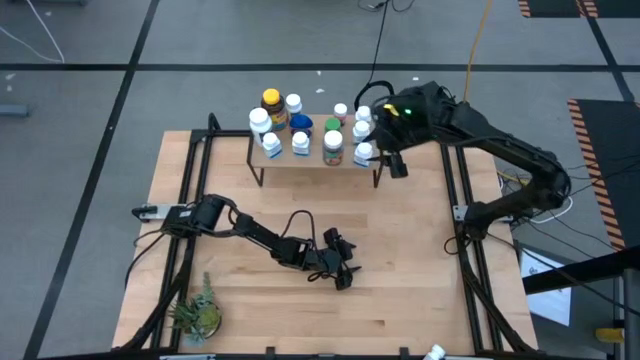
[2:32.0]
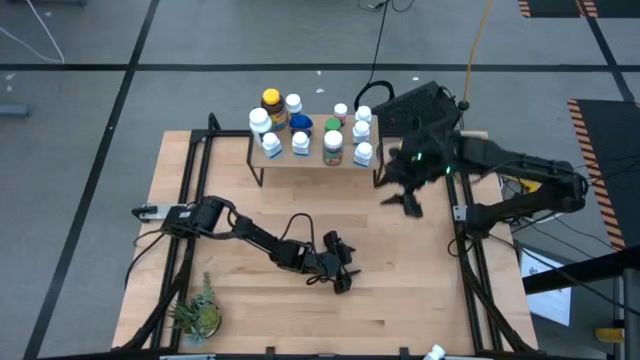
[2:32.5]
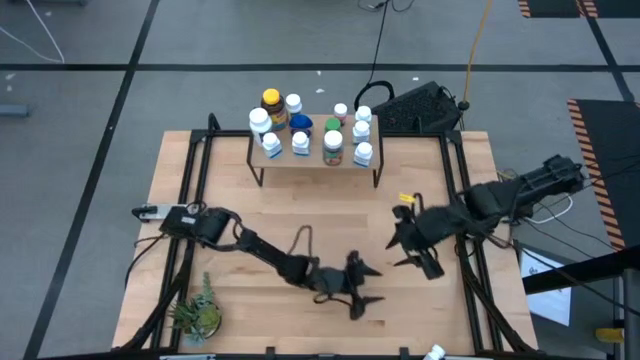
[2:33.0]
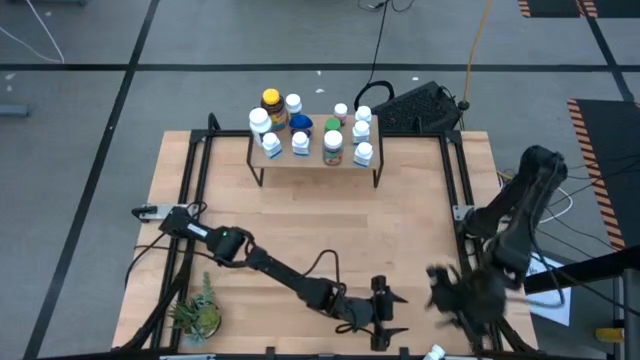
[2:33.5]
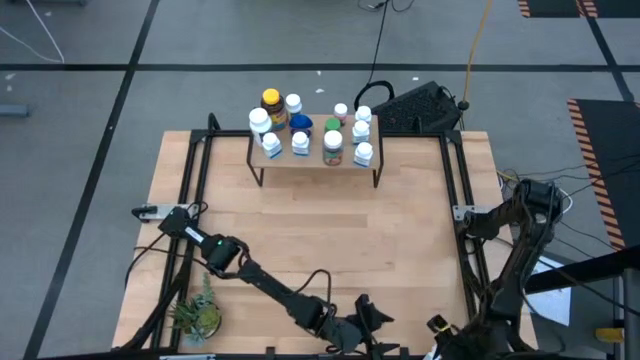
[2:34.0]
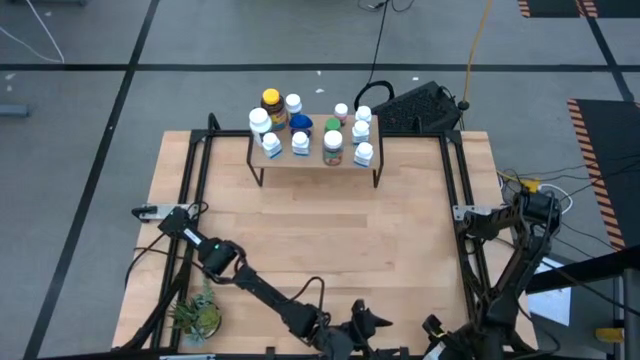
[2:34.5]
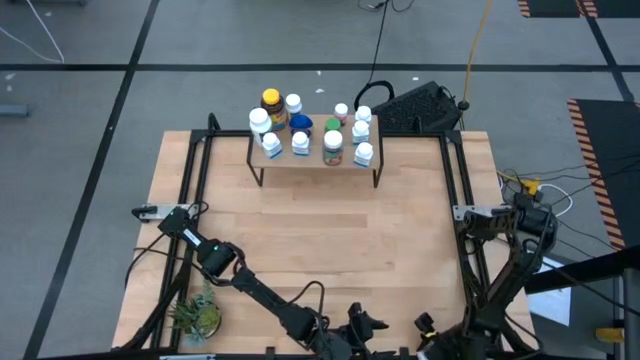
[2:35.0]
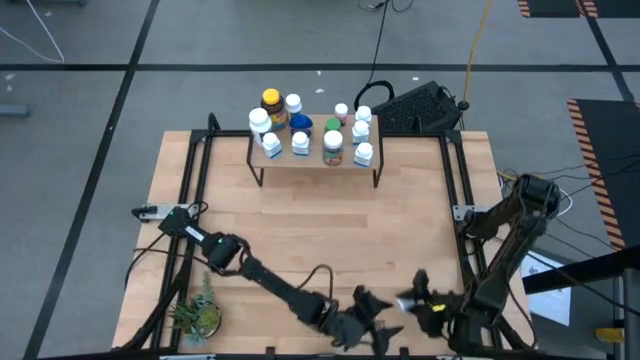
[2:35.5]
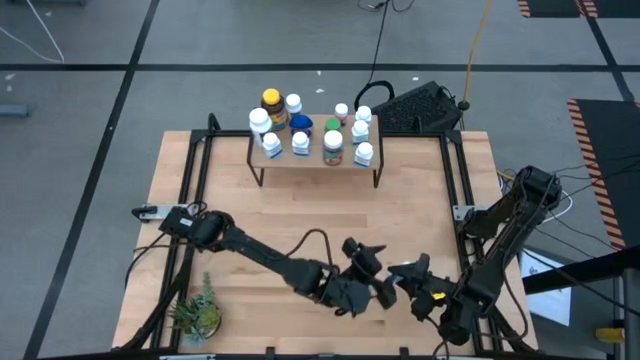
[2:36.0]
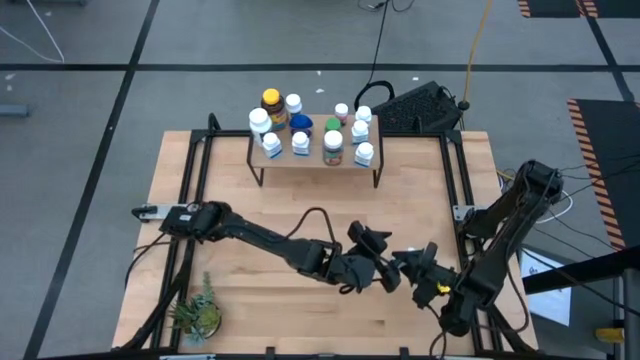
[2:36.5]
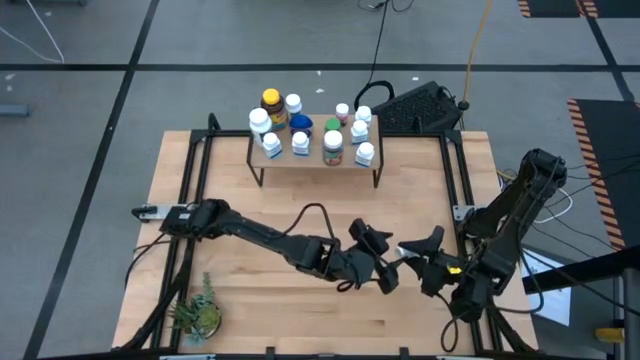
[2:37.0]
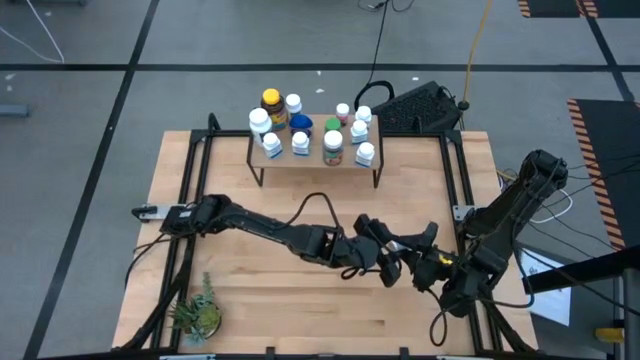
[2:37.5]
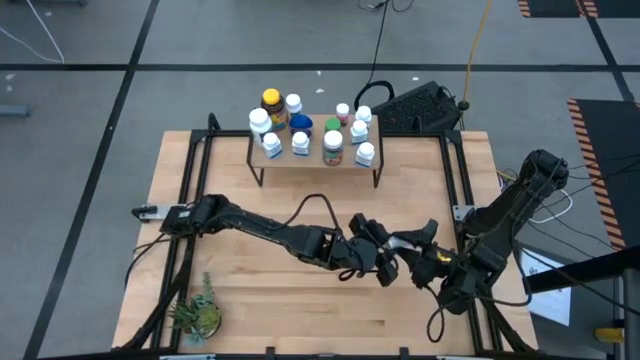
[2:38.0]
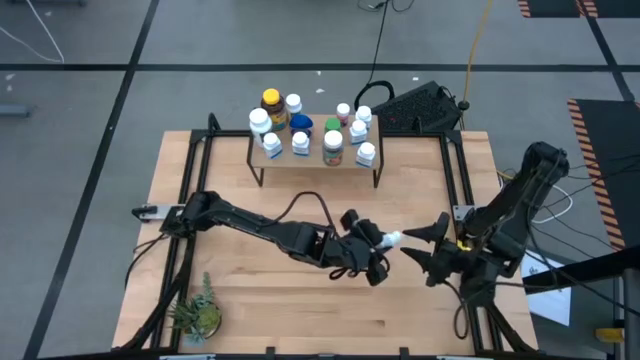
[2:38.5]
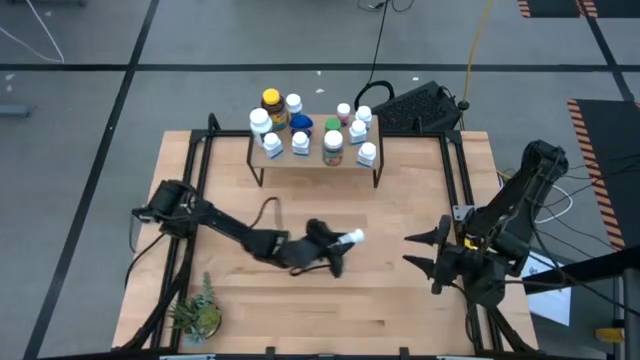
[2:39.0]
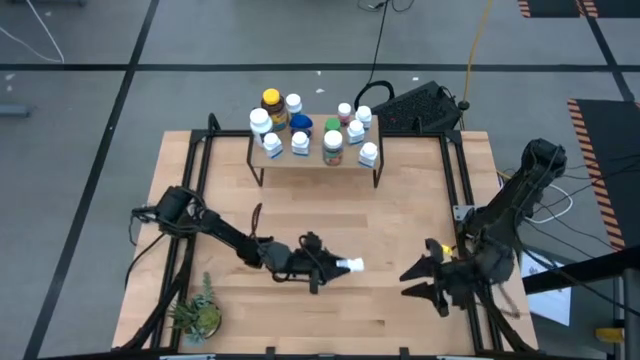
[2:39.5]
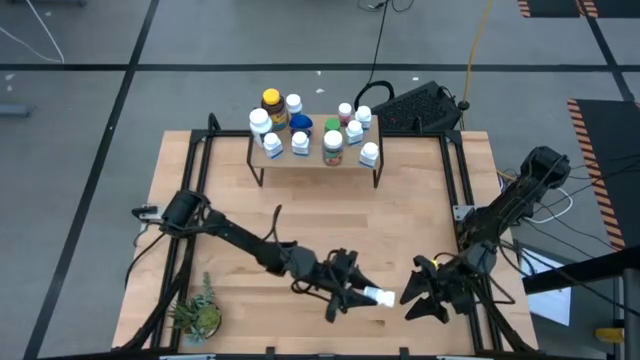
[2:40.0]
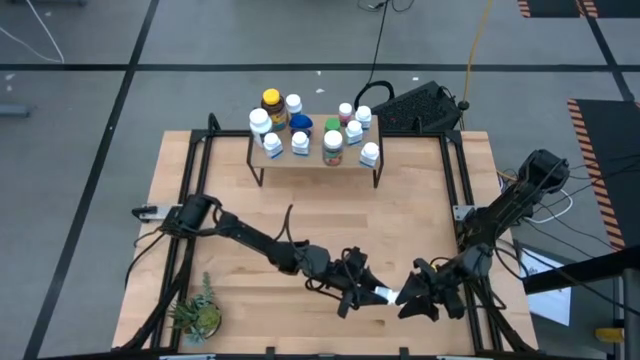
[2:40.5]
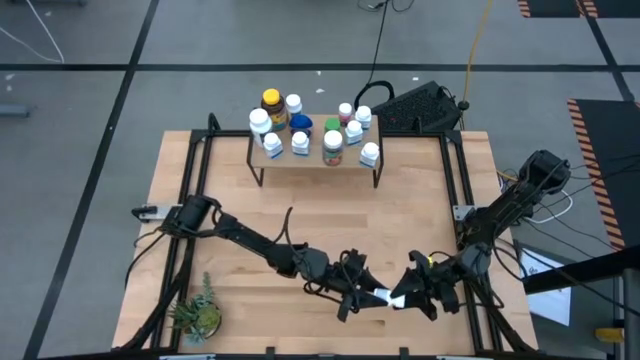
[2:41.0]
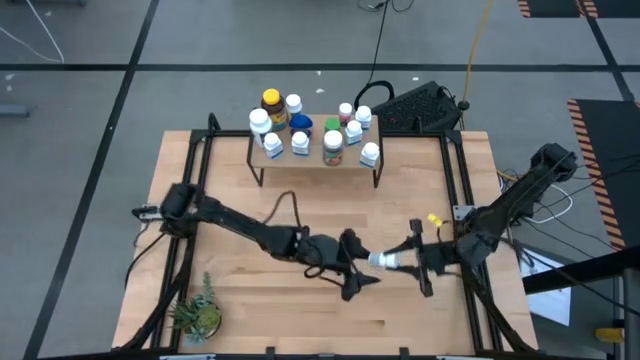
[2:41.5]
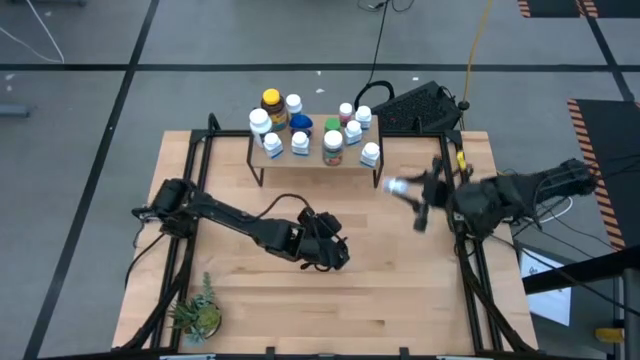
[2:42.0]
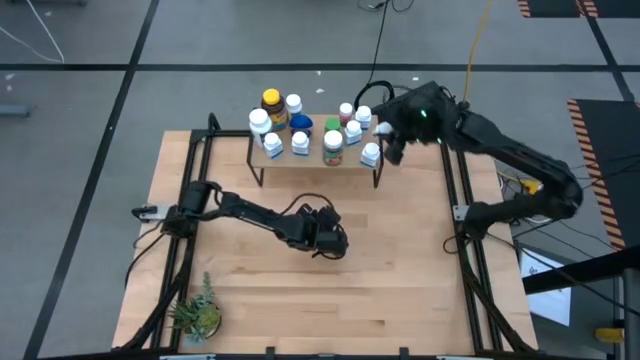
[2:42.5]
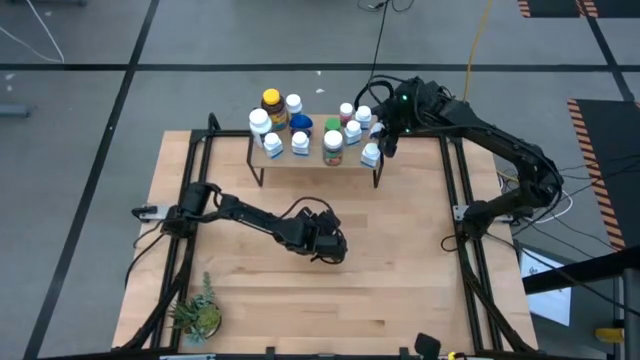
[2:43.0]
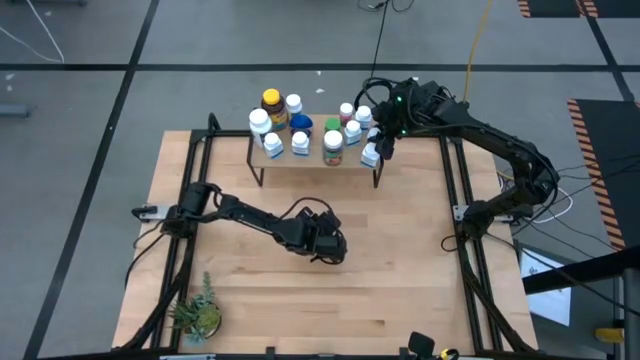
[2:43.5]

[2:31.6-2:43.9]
Task: Pick and place medicine bottles onto shelf by color
Put the white black medicine bottle on the shelf

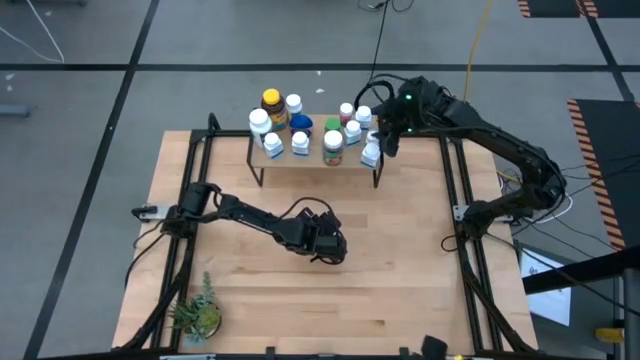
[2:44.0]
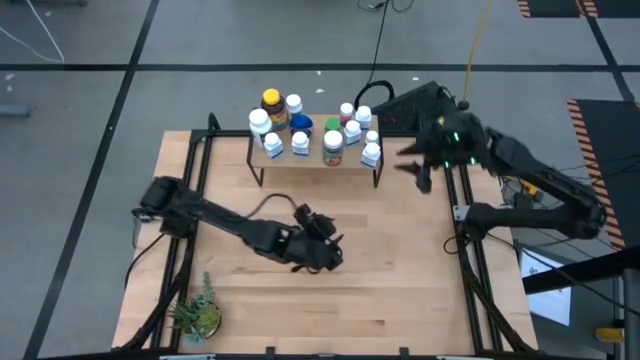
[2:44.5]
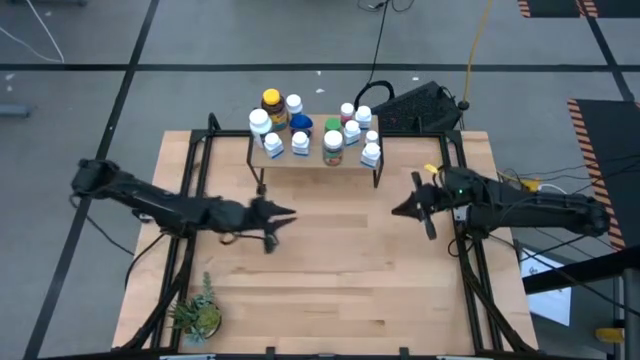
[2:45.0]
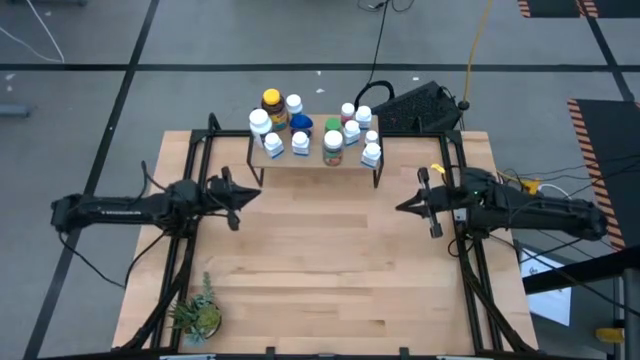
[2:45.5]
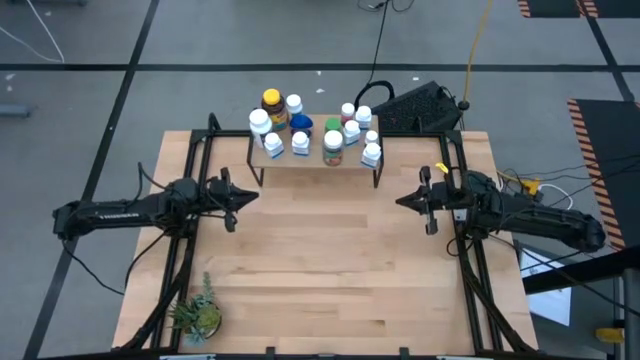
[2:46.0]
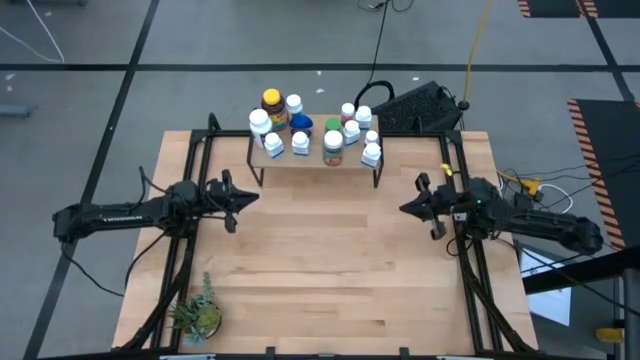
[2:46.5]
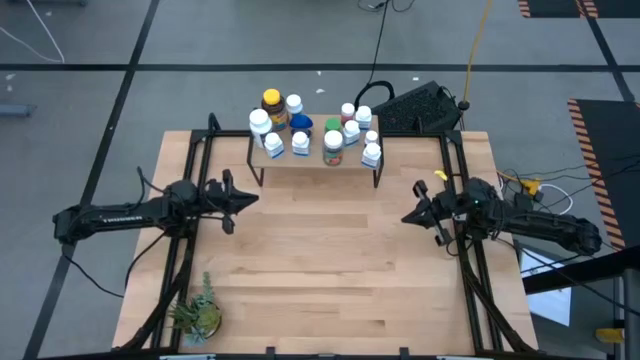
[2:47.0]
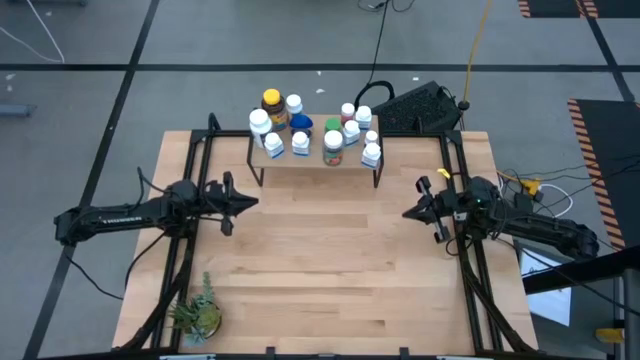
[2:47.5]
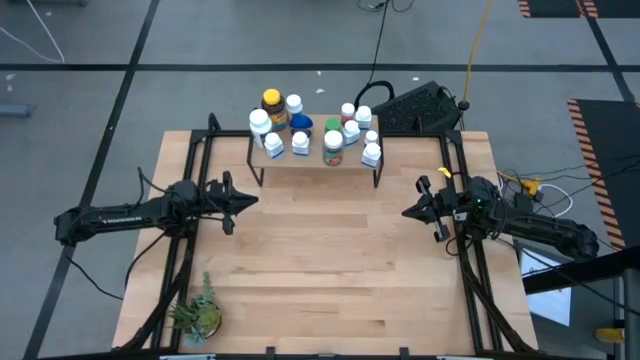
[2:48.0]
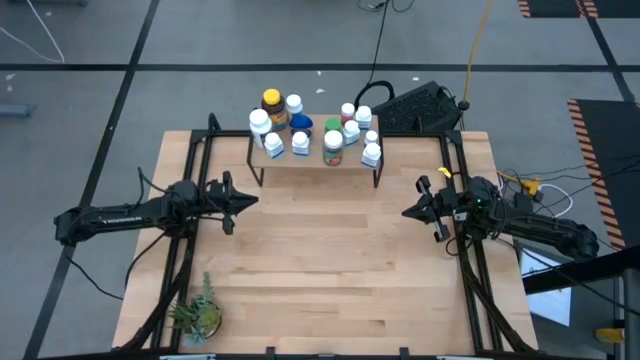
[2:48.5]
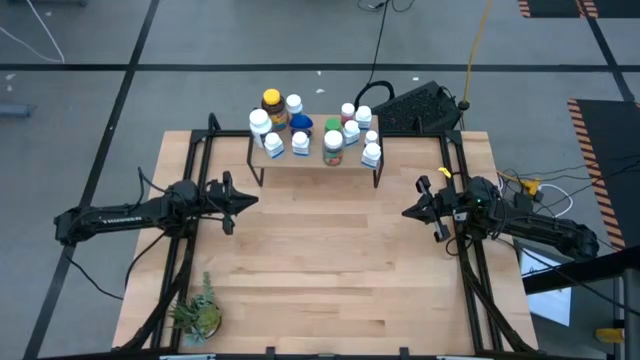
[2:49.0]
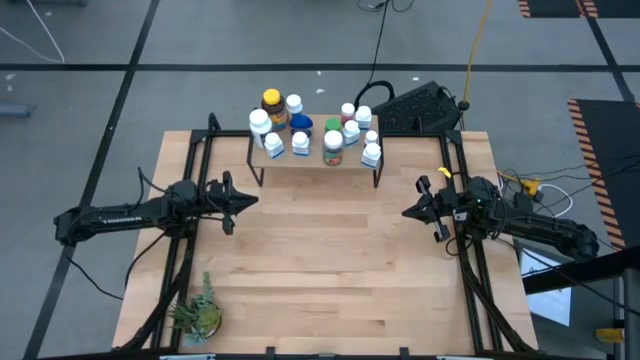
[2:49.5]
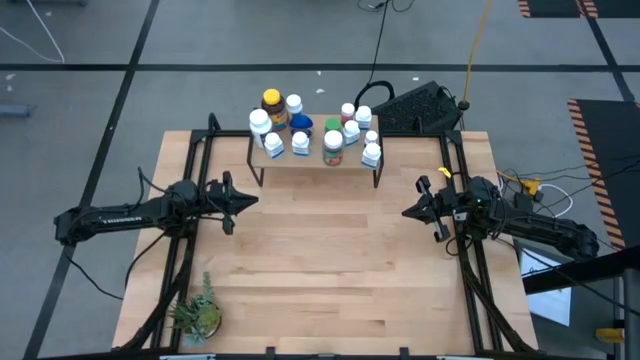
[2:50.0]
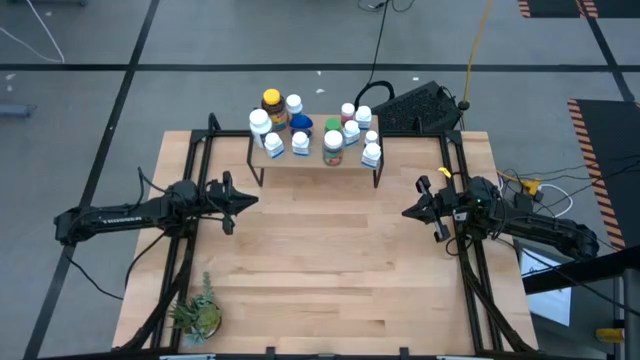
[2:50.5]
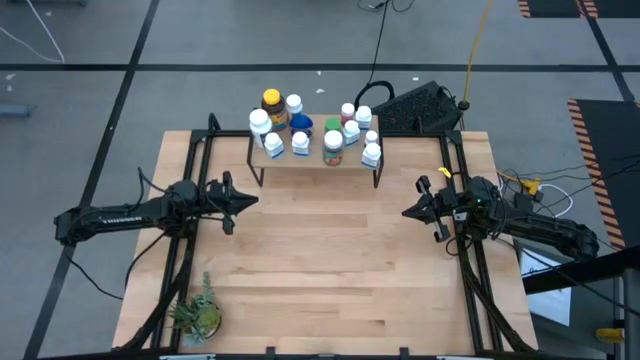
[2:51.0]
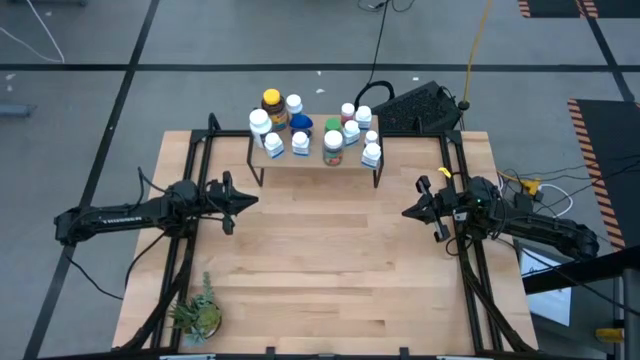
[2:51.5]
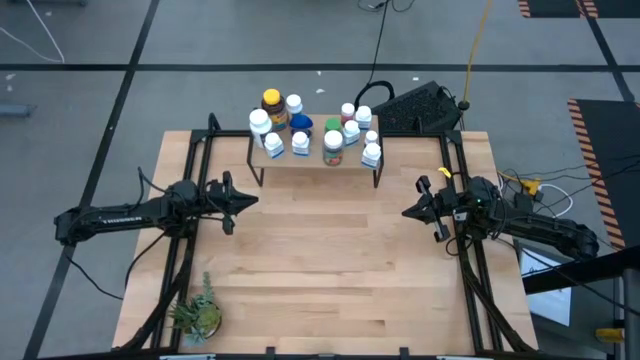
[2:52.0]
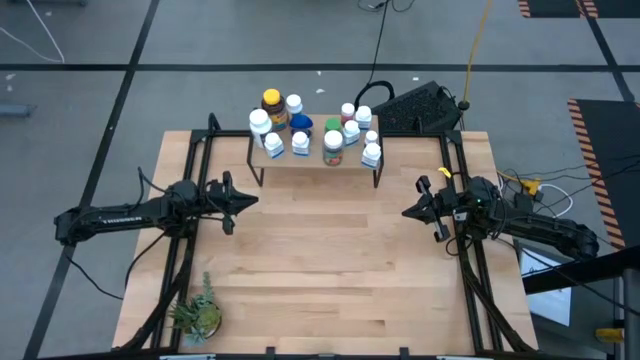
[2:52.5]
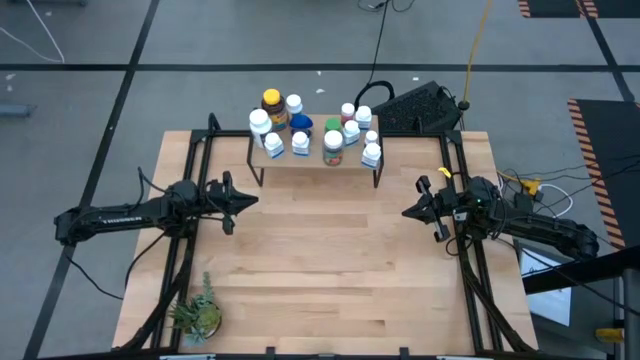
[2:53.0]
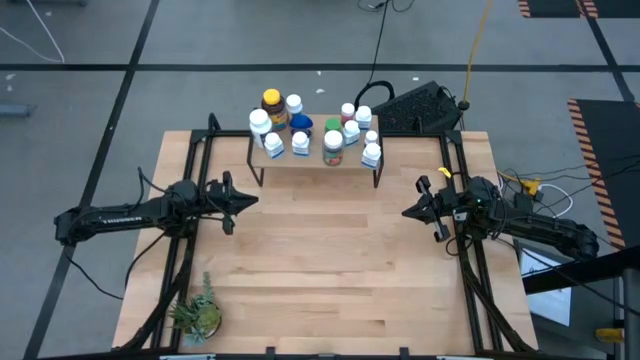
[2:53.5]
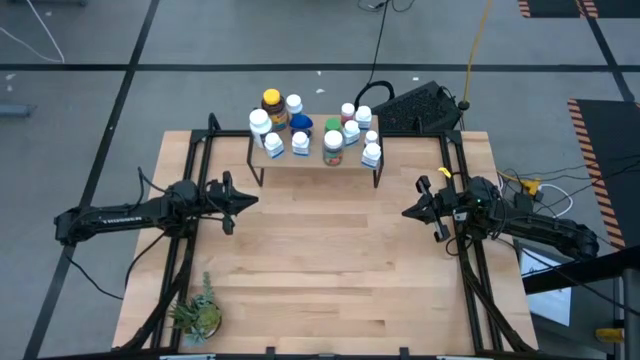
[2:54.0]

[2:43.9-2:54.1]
Return to Home Position
